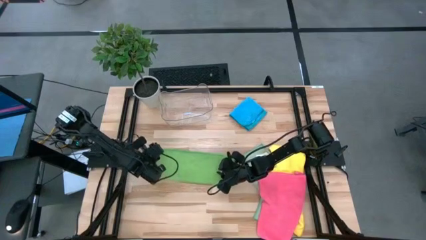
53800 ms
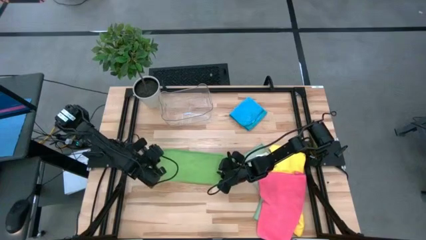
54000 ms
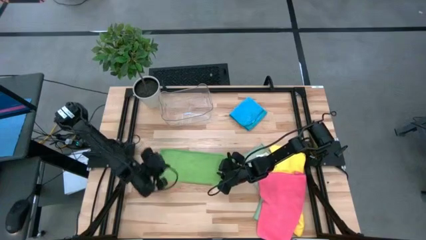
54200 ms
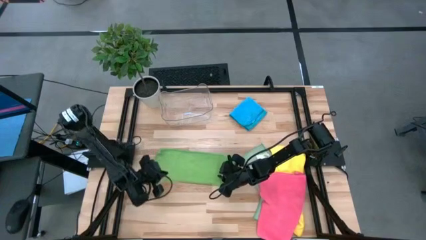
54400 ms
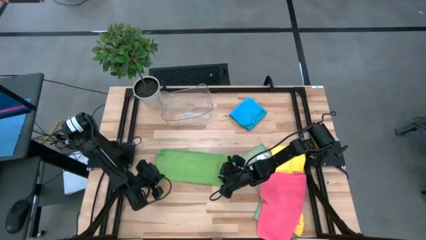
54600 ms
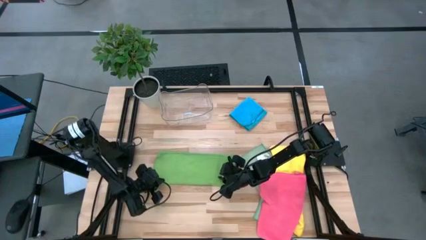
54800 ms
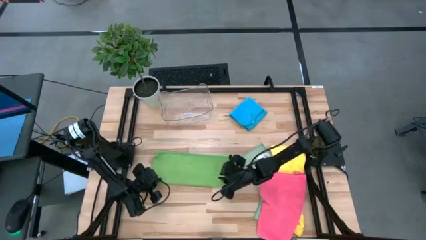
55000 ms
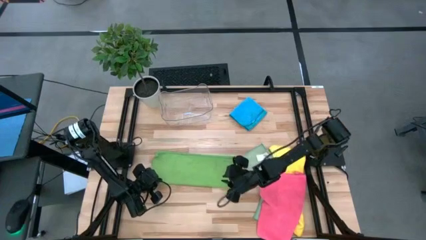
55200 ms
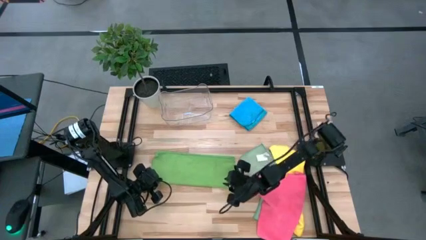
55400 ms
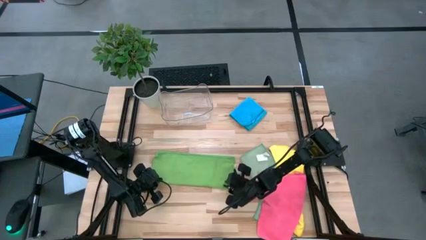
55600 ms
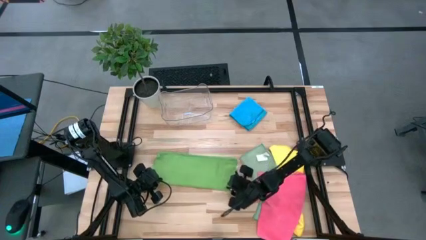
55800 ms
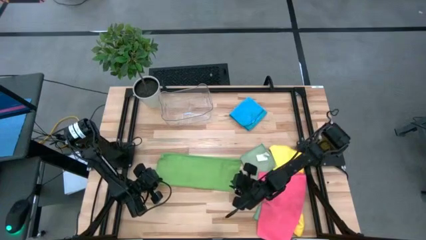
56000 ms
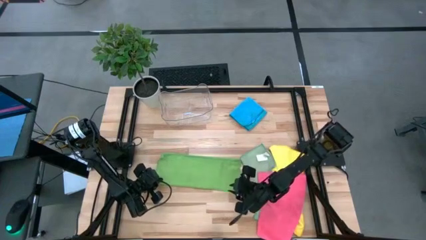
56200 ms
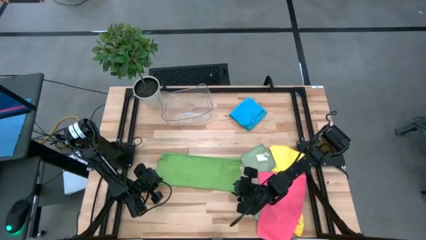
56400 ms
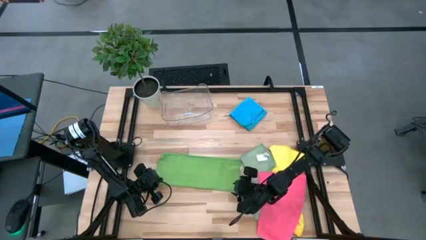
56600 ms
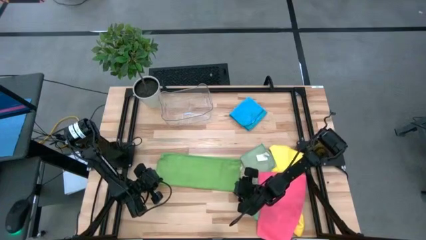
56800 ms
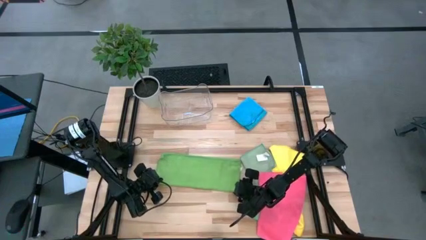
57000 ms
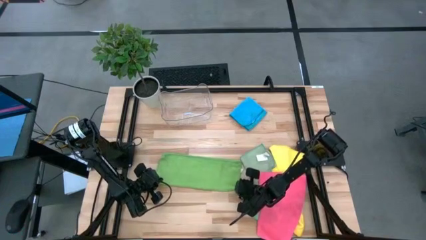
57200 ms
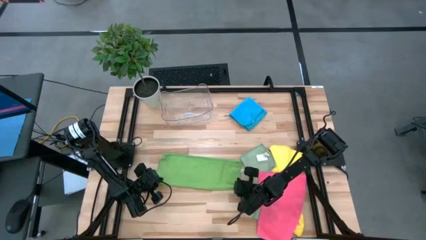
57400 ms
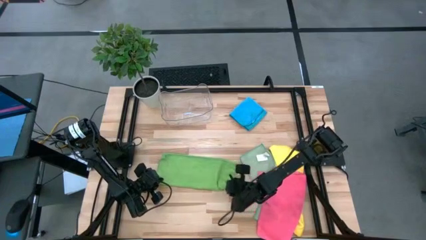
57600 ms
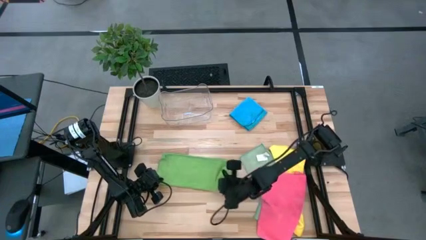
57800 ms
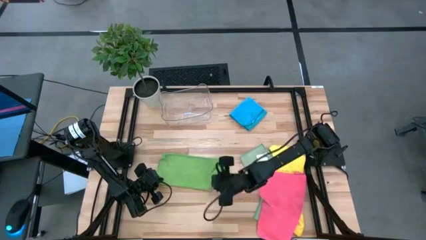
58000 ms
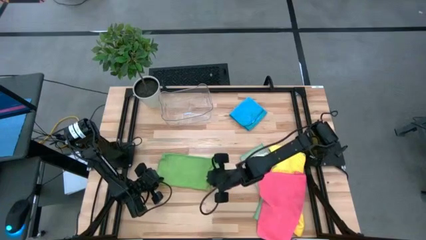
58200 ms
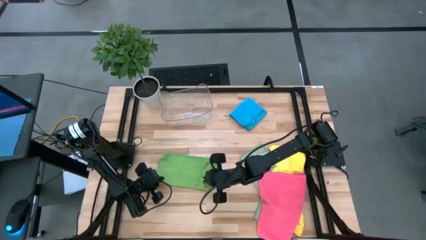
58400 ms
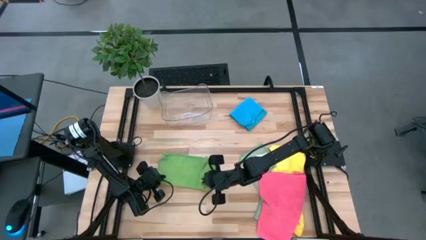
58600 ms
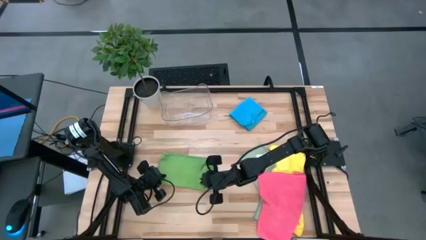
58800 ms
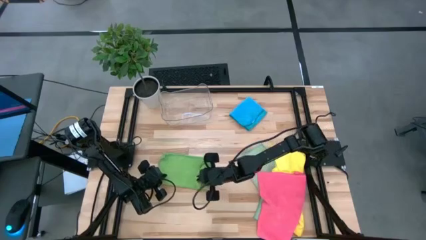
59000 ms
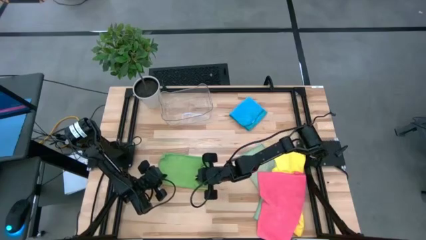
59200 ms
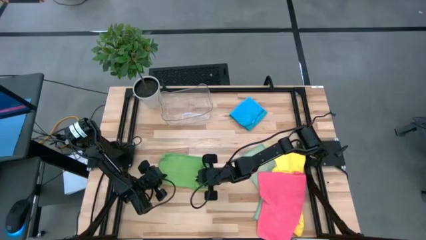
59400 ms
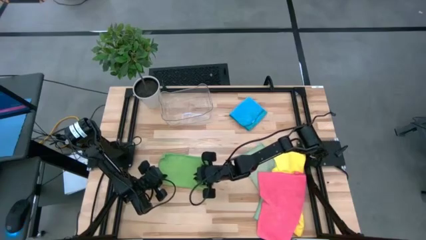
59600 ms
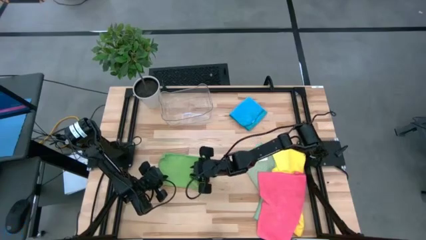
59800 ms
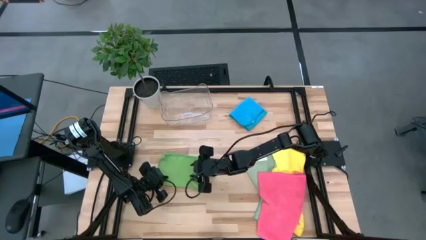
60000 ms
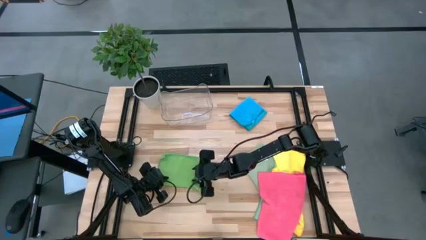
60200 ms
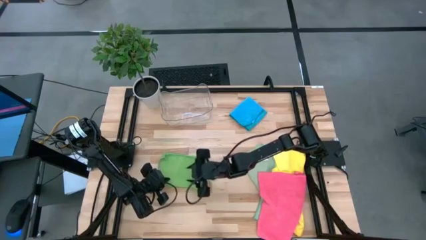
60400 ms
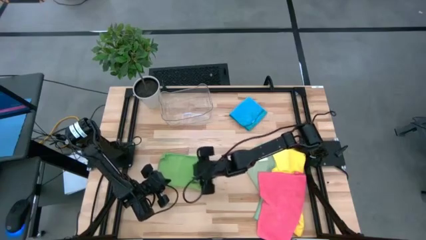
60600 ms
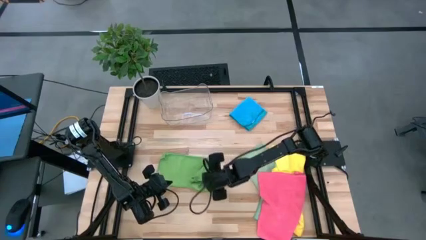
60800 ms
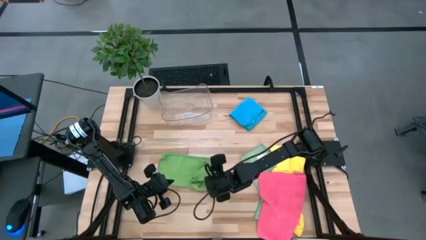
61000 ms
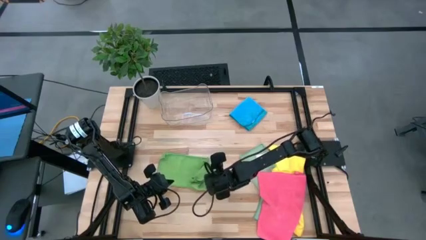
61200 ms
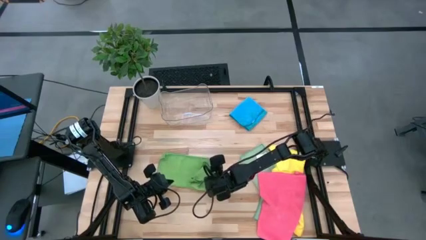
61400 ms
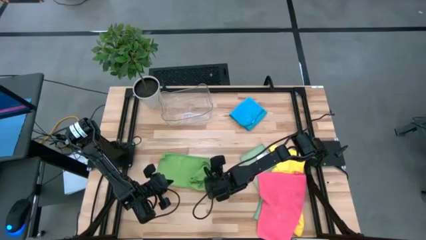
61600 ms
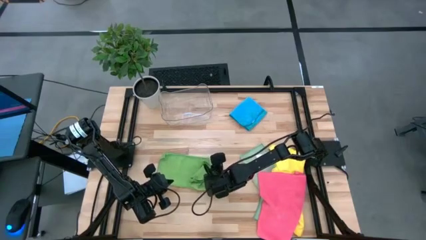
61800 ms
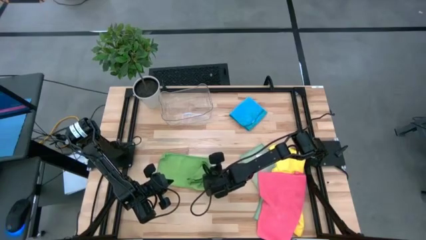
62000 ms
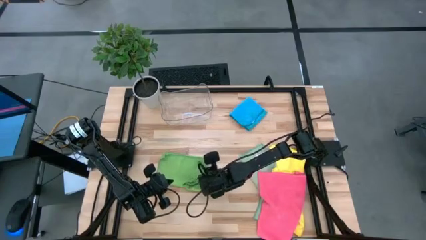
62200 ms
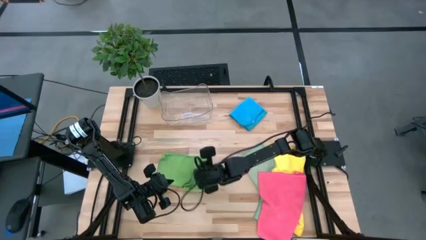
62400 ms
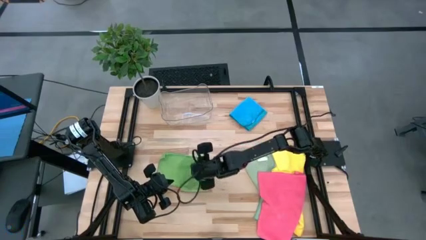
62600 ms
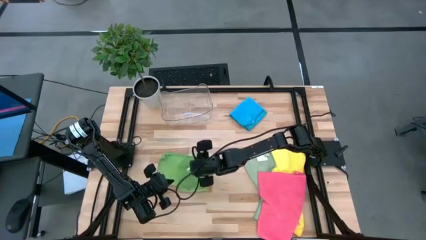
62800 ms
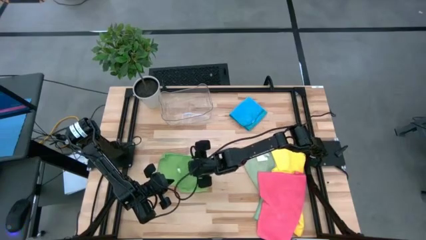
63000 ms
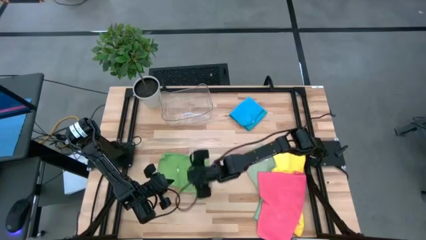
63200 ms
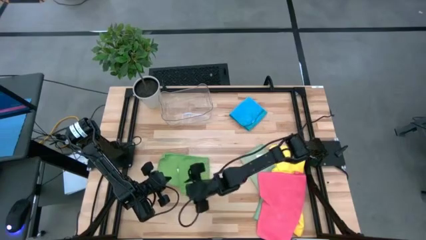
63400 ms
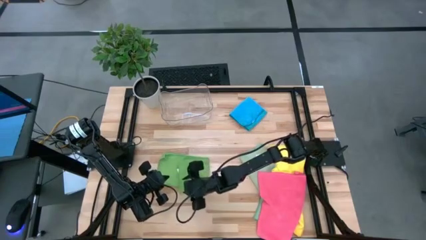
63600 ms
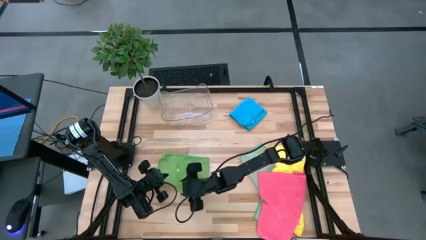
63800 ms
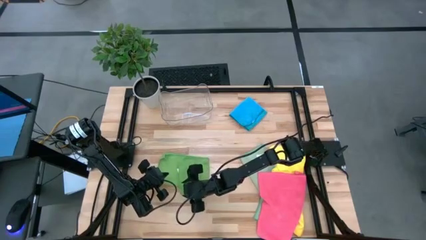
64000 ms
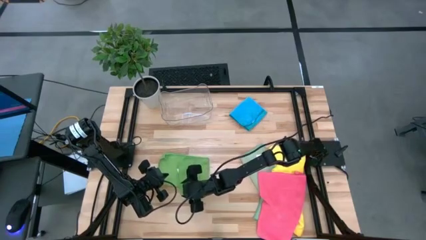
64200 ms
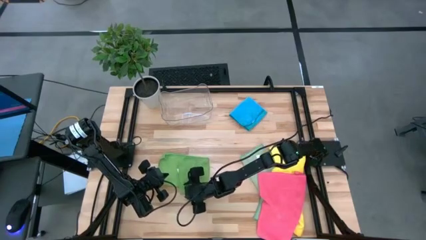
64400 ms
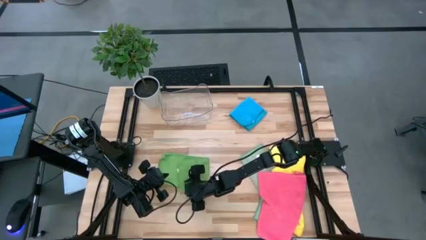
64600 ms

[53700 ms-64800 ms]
Task: Fold microfiber towels
Fold the green microfiber cloth

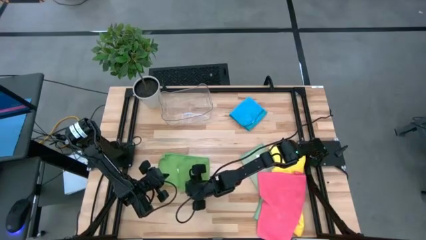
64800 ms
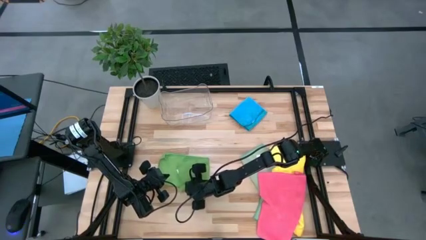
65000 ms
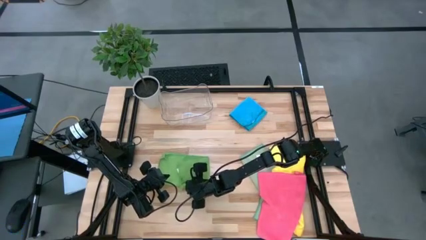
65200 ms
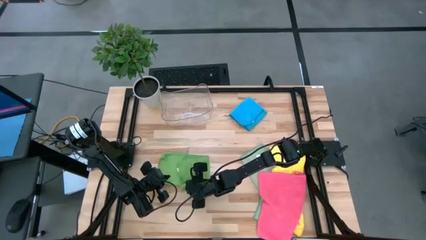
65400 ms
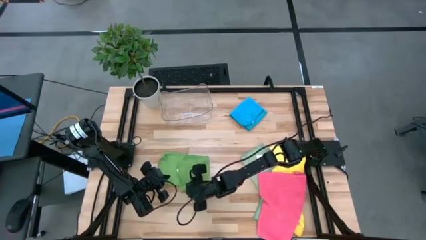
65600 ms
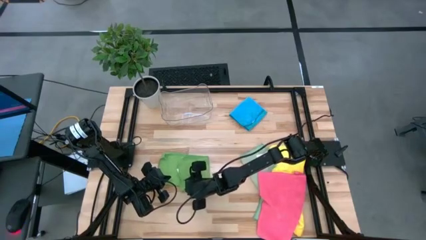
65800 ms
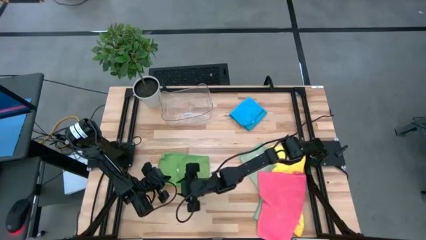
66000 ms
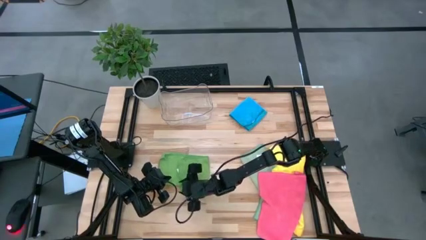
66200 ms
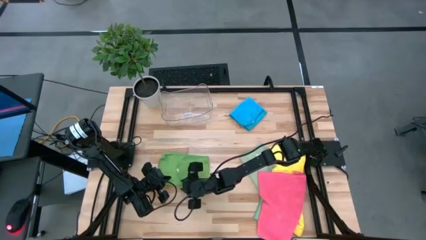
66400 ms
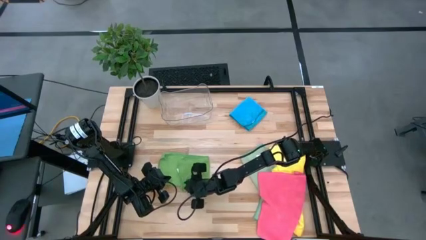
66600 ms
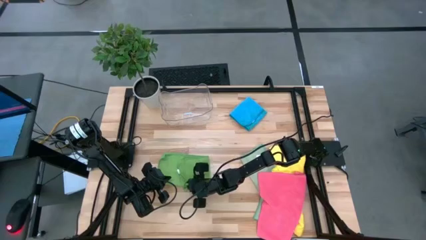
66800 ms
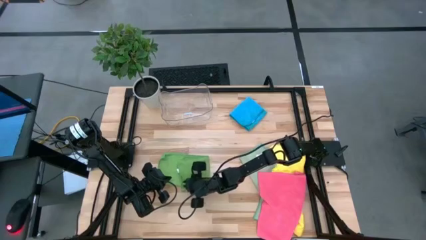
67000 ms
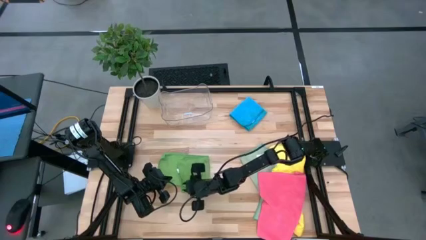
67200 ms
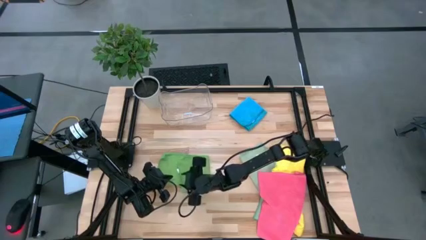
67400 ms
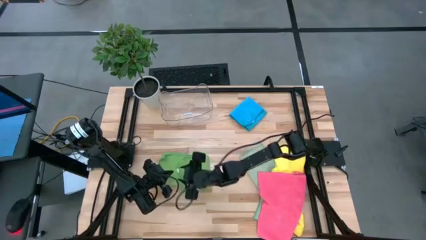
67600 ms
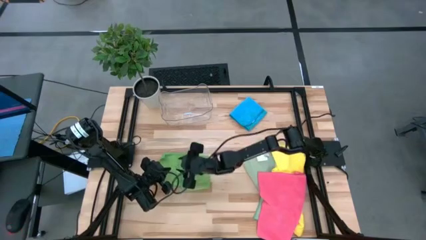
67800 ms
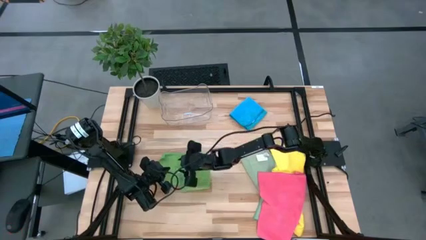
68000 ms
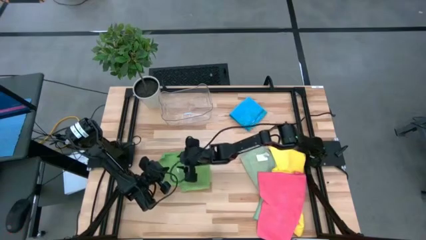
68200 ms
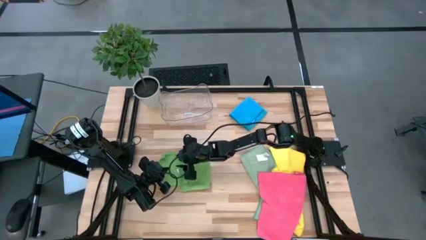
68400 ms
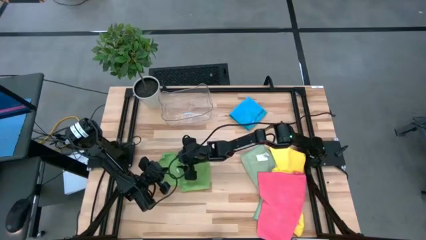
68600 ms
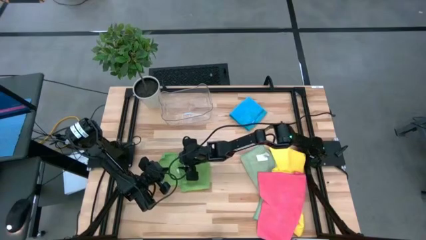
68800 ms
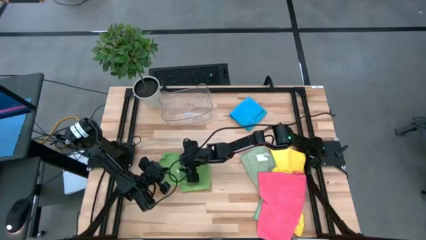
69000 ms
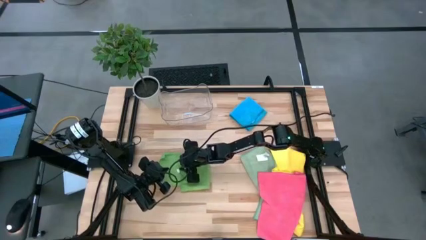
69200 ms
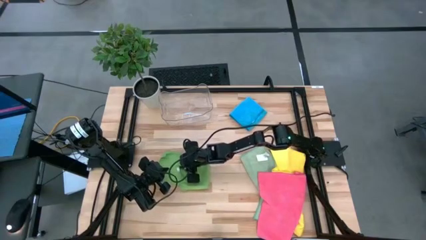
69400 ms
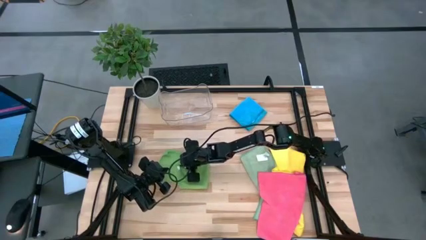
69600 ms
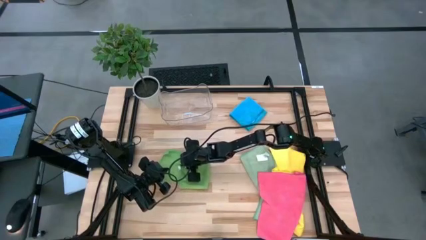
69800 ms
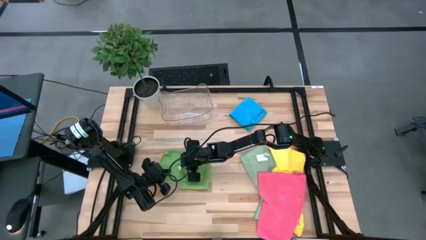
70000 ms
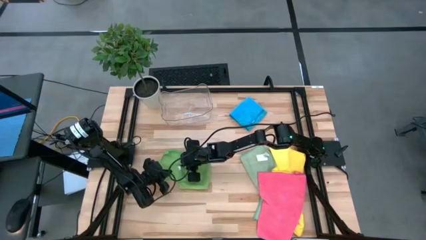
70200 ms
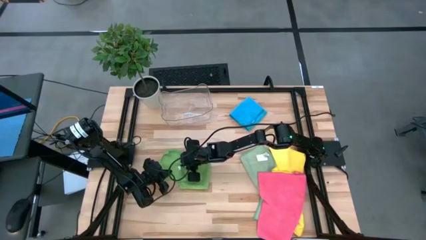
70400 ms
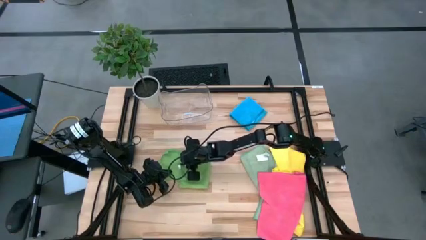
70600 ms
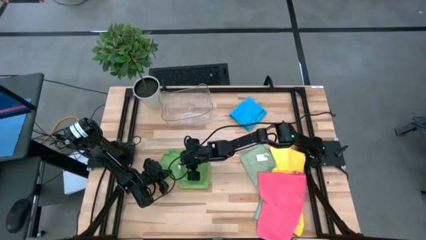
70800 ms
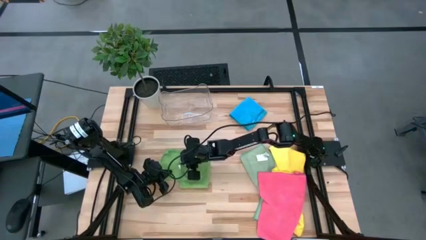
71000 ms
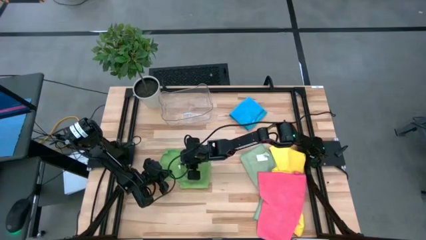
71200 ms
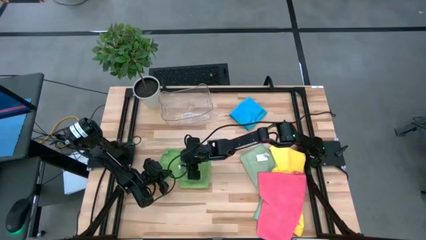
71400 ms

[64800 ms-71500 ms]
Fold the green microfiber cloth
